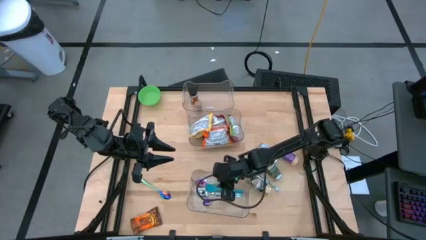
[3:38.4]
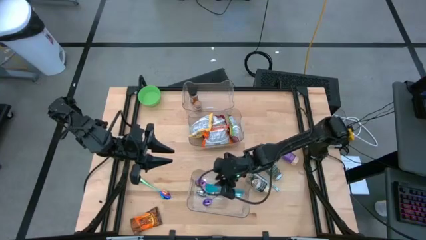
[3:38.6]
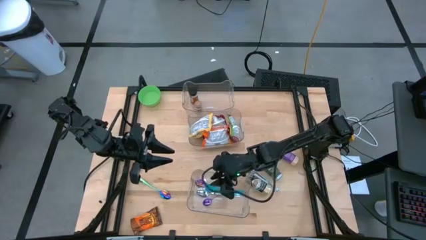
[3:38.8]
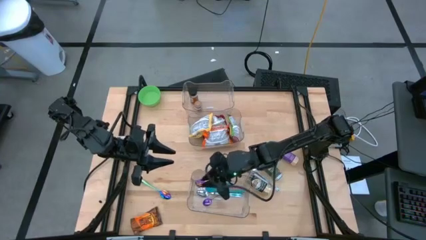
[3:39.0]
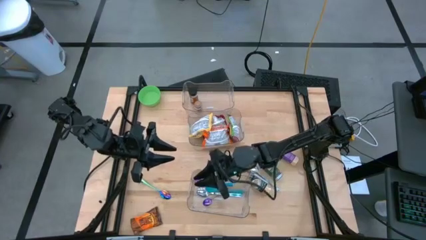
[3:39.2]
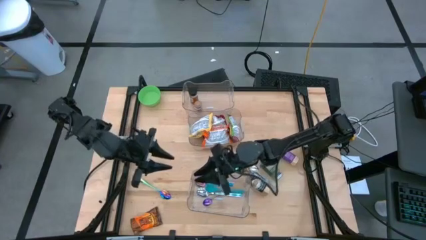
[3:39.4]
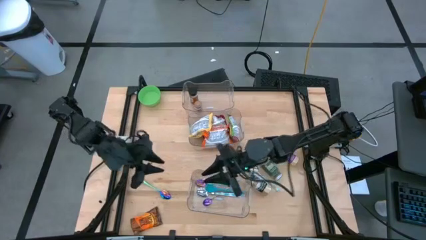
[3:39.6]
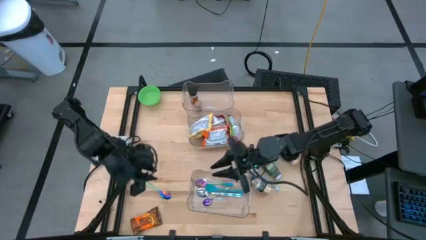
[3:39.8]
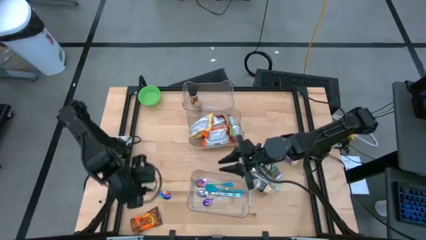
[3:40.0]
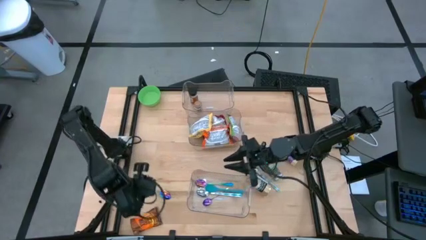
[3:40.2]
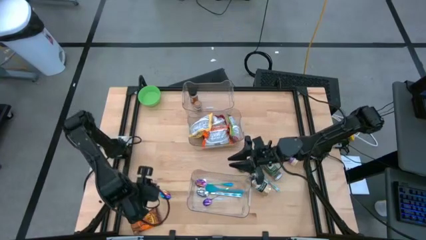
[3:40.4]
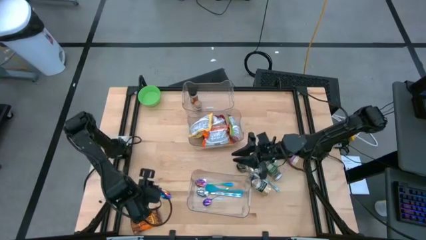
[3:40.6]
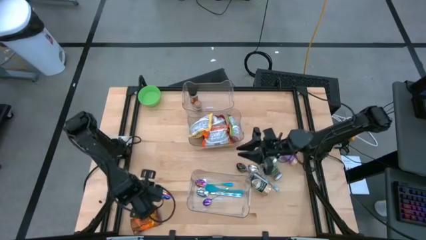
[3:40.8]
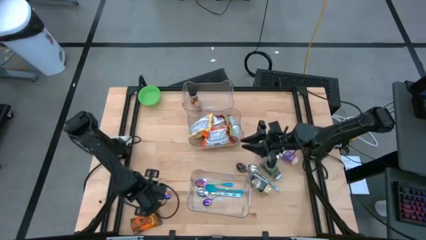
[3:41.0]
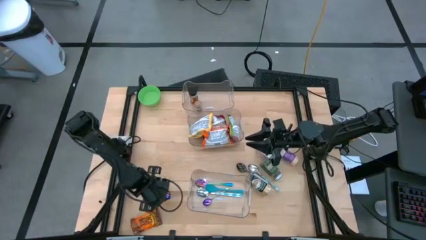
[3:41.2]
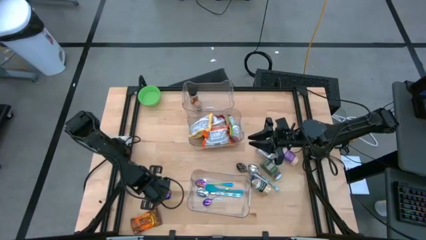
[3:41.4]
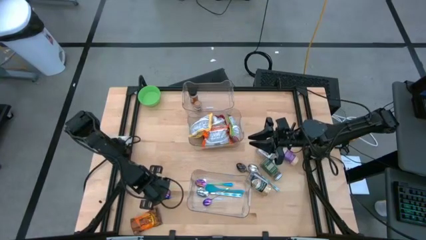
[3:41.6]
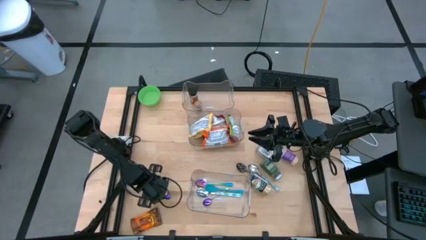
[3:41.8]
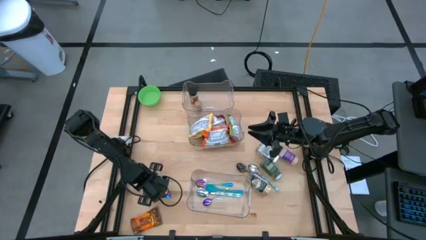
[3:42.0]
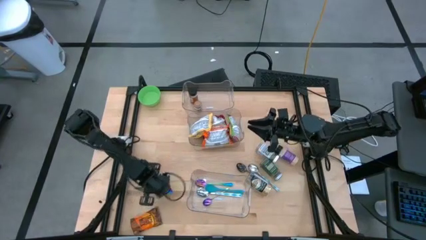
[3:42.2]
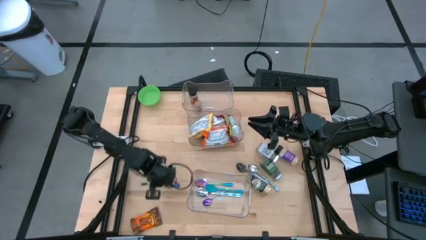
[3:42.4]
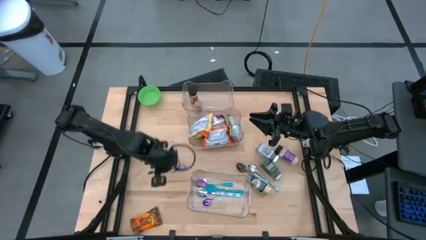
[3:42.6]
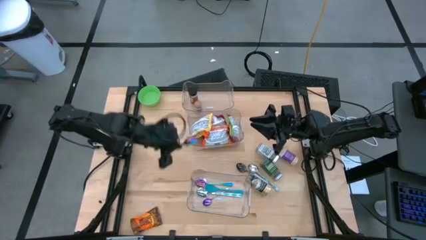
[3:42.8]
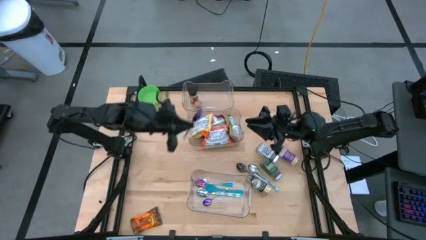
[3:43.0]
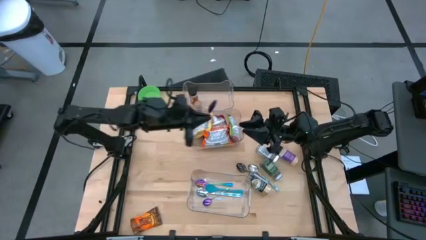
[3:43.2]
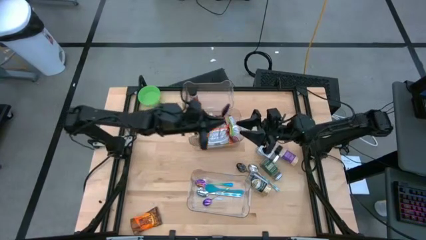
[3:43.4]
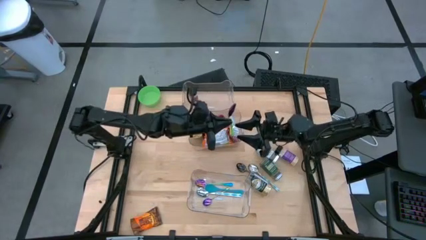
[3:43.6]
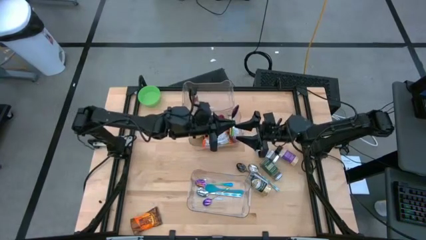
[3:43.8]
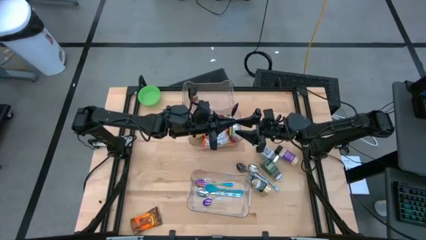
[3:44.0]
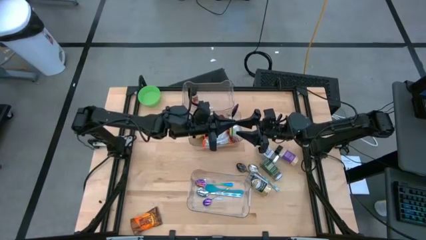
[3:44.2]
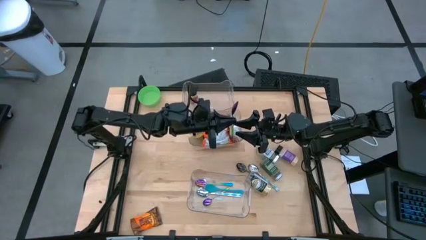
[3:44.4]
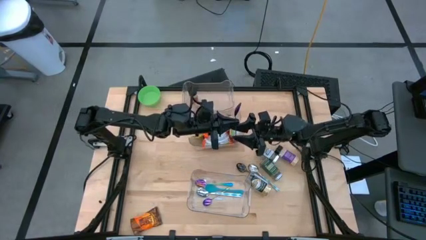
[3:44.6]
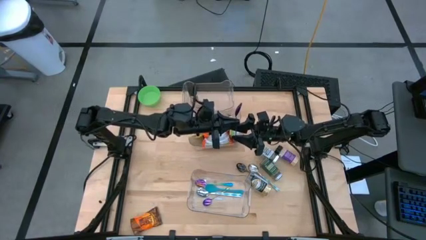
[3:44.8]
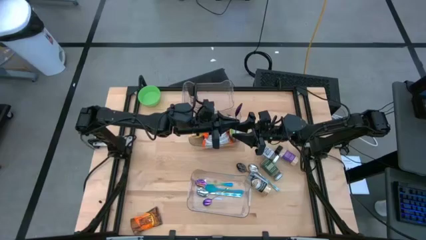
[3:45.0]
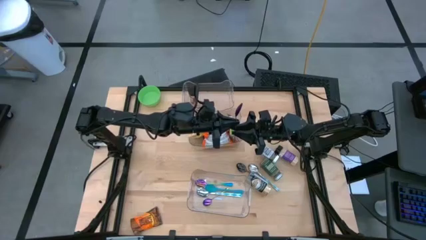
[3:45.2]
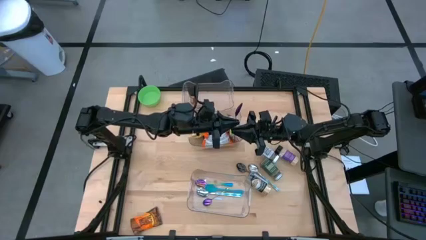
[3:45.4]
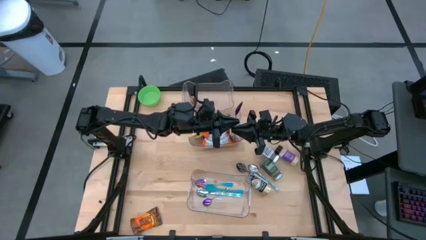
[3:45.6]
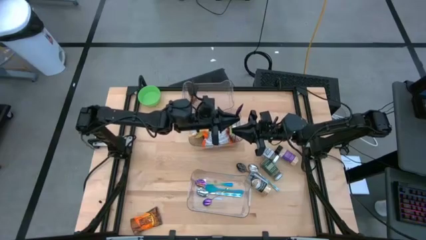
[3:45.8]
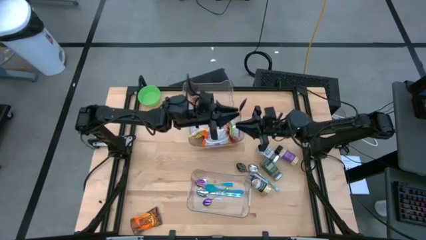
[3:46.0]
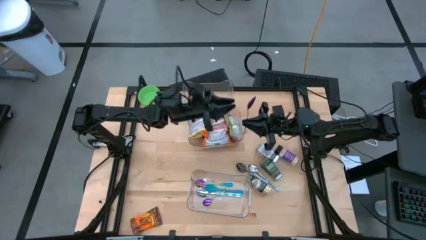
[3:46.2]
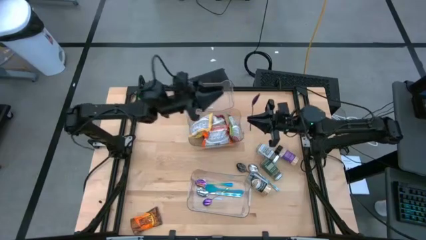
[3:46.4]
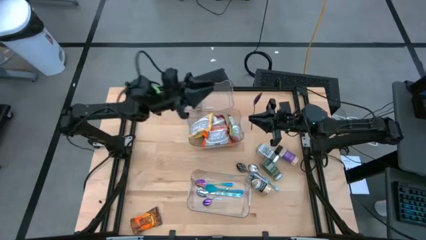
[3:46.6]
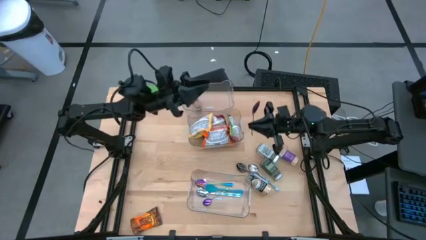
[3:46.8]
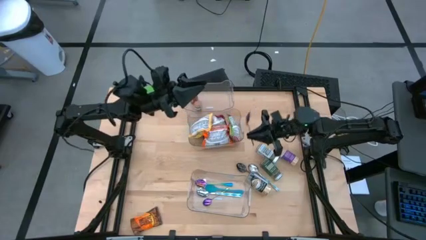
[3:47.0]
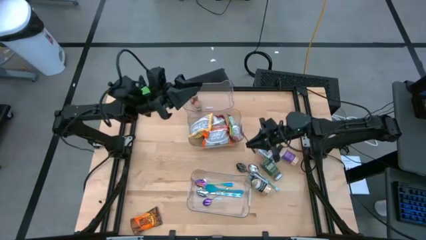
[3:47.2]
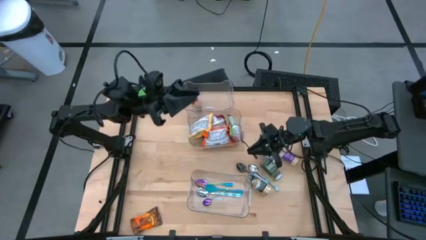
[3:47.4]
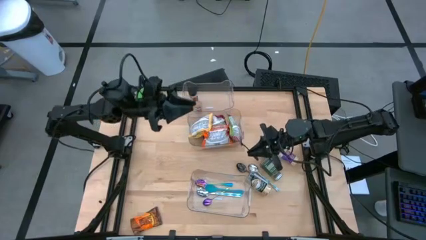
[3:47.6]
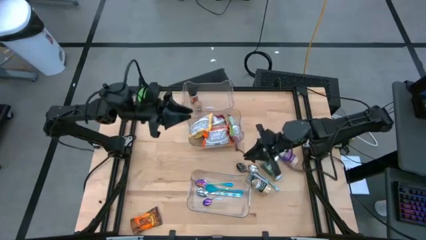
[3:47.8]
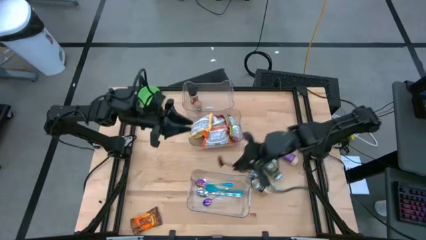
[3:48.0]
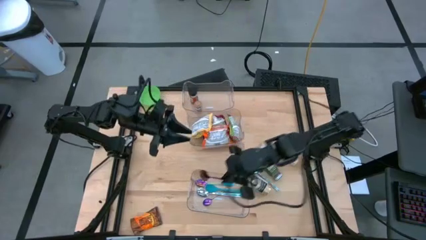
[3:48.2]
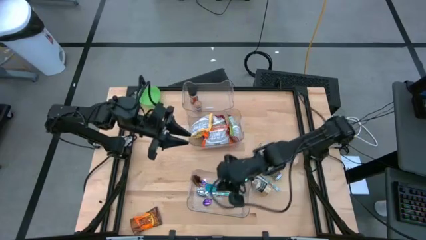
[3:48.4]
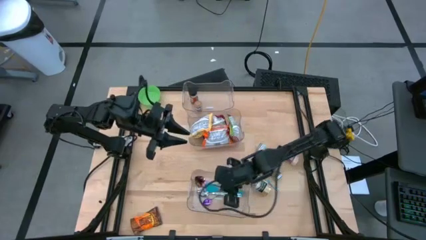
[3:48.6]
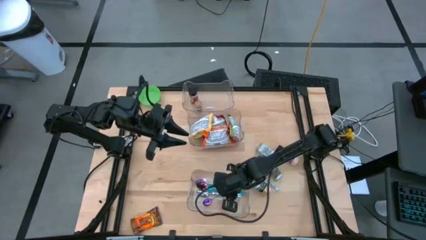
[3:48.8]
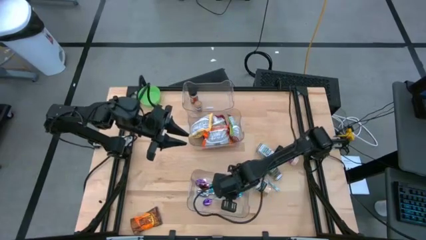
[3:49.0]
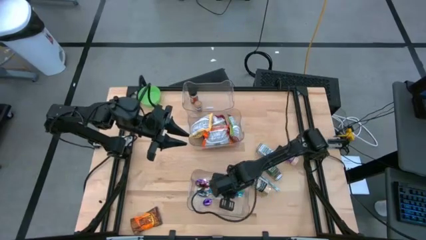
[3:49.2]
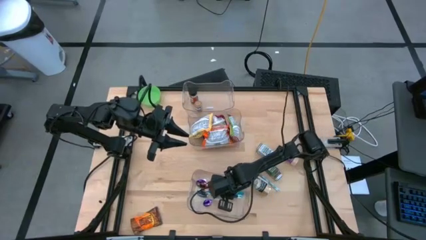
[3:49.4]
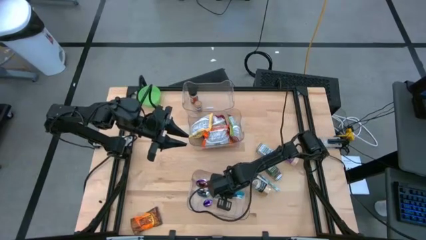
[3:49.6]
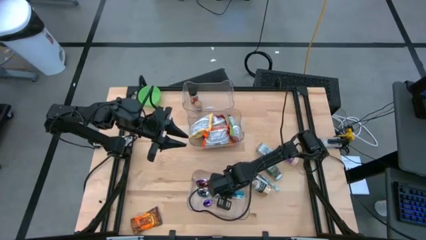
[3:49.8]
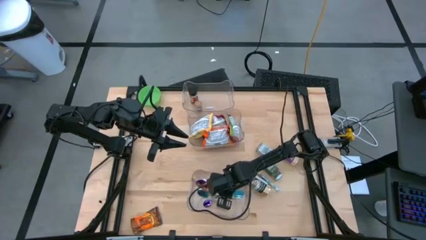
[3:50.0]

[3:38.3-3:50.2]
Task: Pick & Place Food Item
Put the purple spoon into the bottom transparent bin
